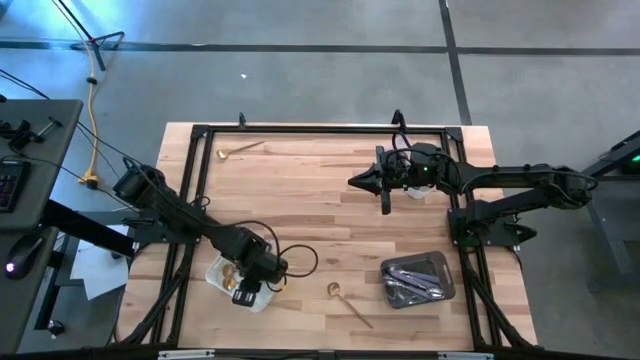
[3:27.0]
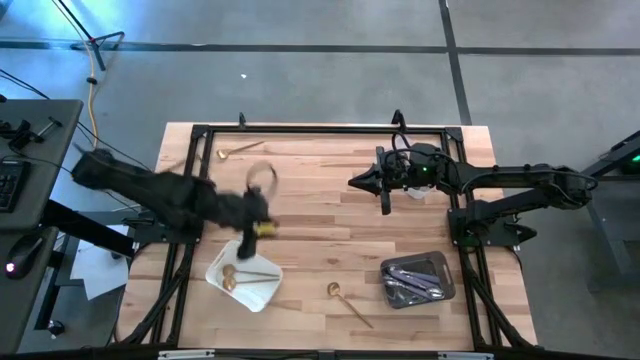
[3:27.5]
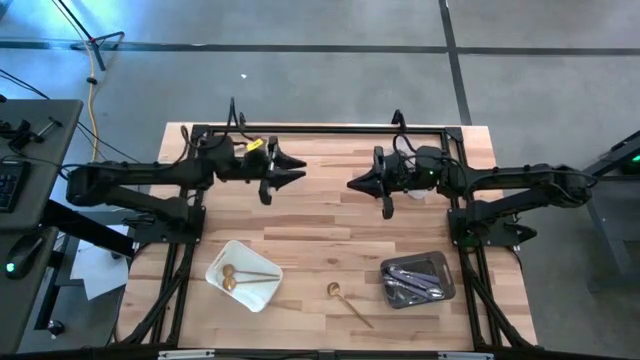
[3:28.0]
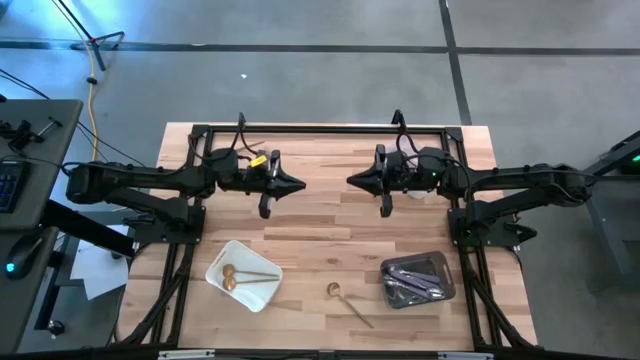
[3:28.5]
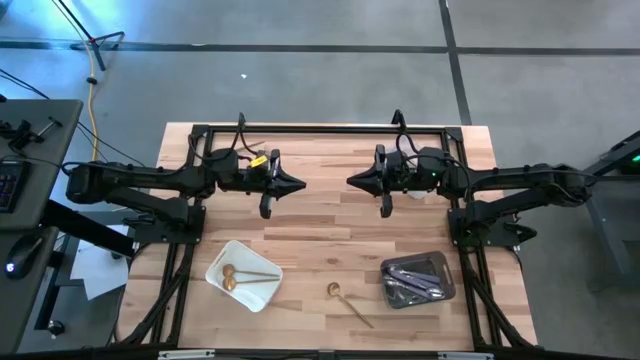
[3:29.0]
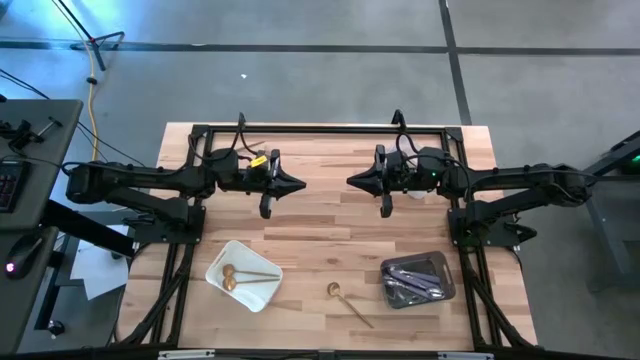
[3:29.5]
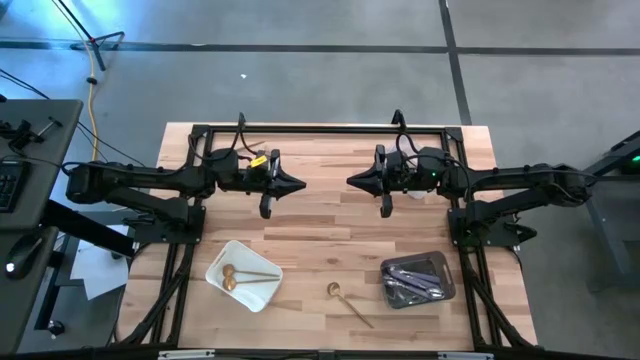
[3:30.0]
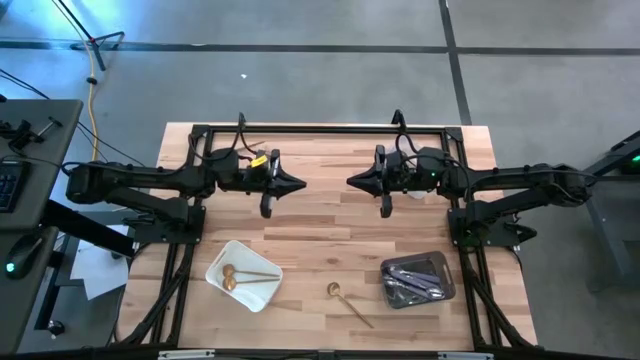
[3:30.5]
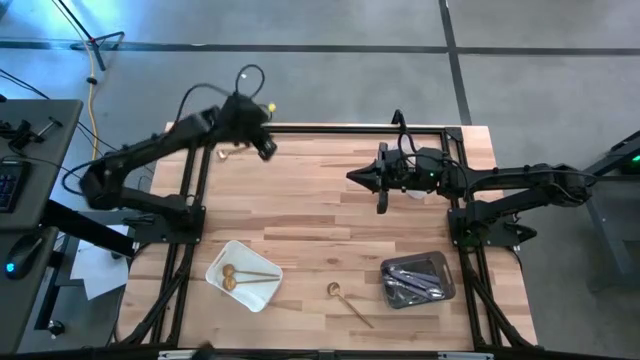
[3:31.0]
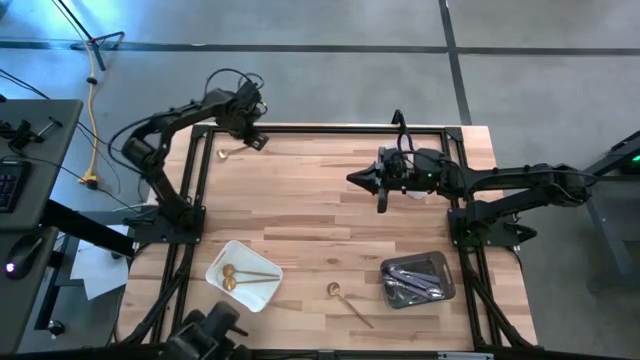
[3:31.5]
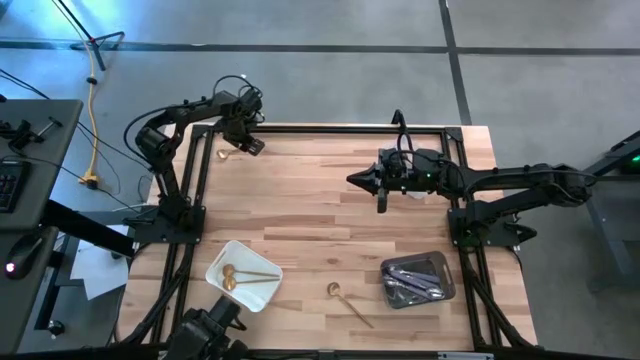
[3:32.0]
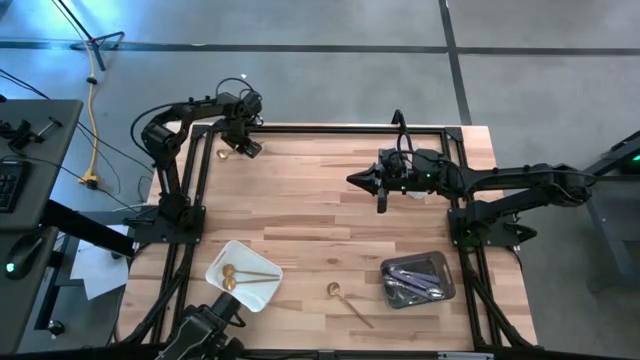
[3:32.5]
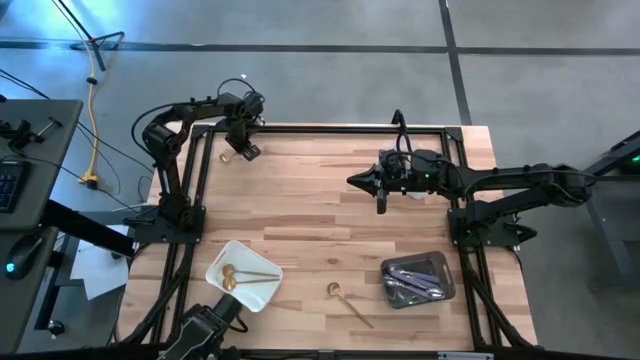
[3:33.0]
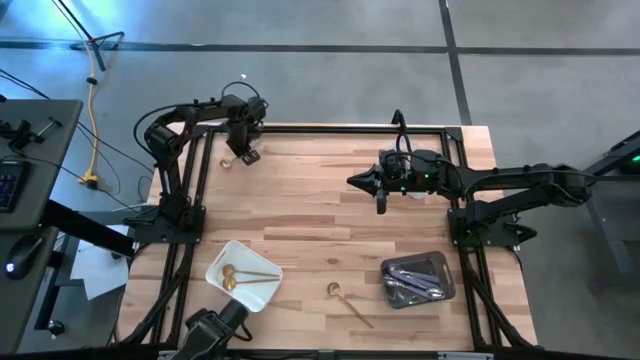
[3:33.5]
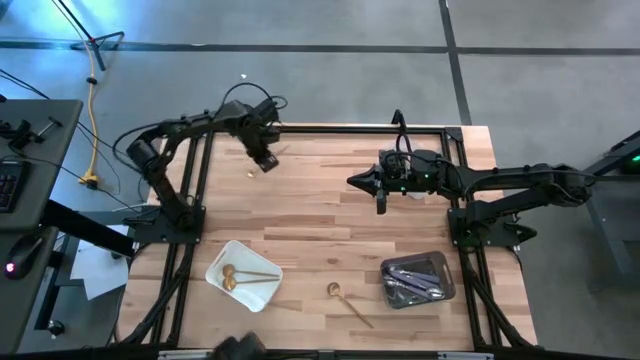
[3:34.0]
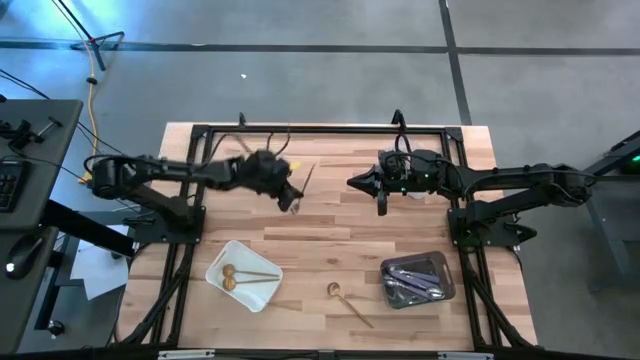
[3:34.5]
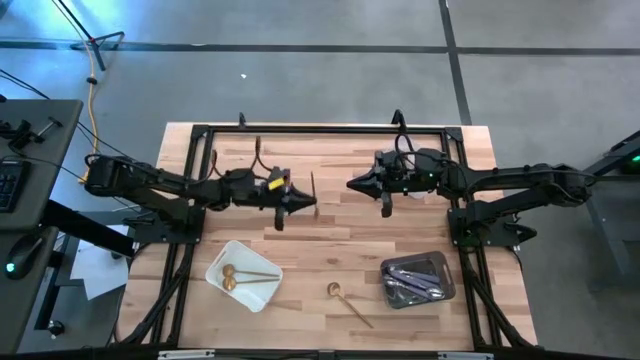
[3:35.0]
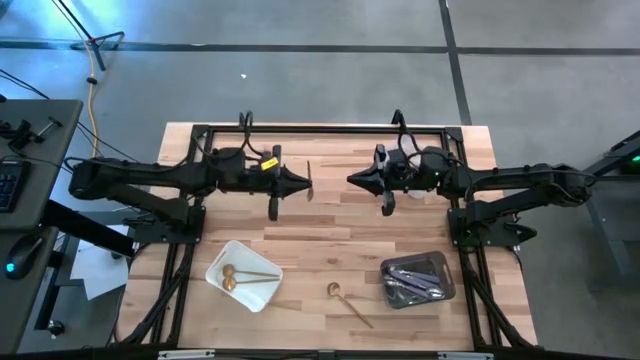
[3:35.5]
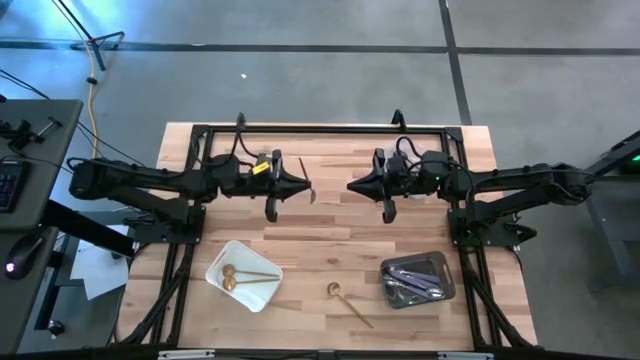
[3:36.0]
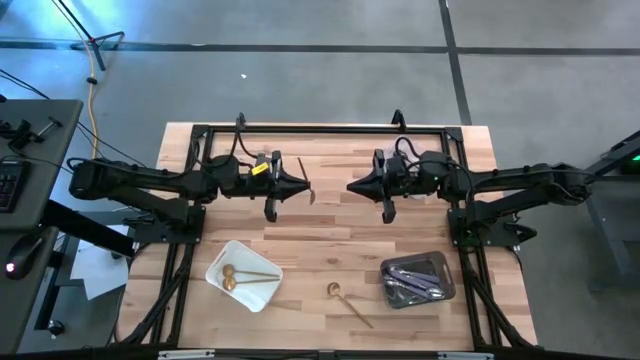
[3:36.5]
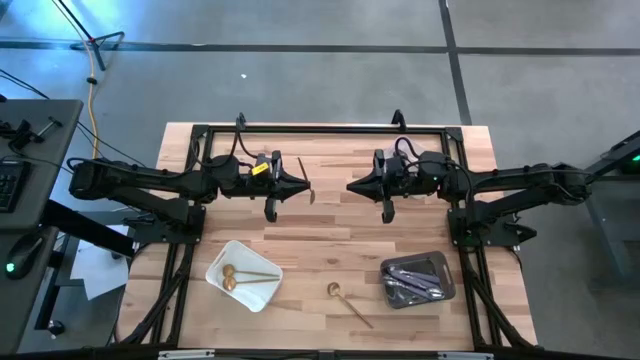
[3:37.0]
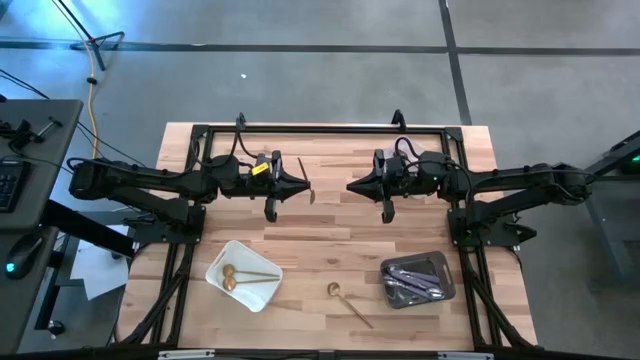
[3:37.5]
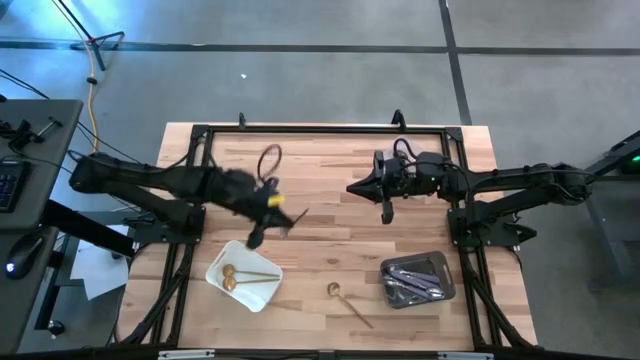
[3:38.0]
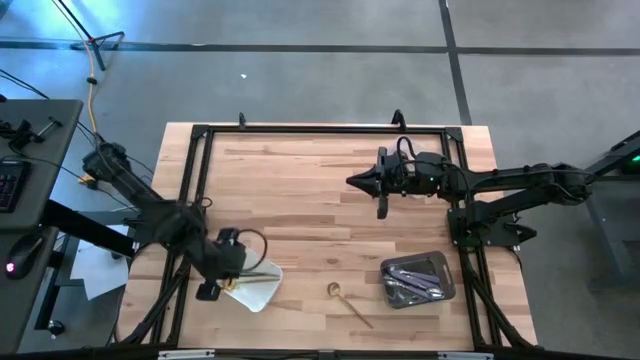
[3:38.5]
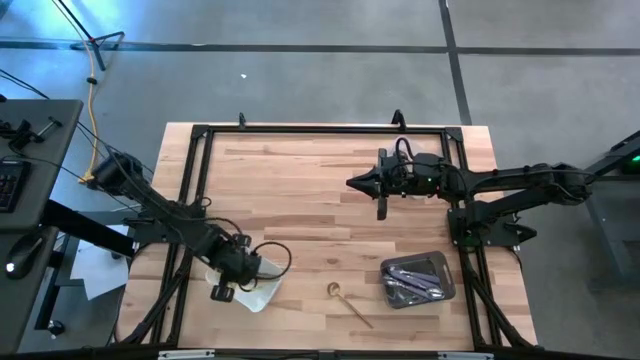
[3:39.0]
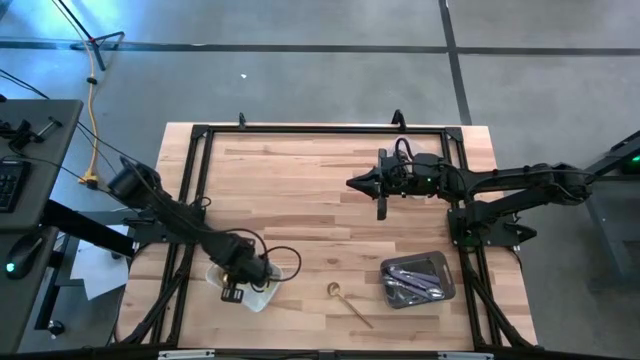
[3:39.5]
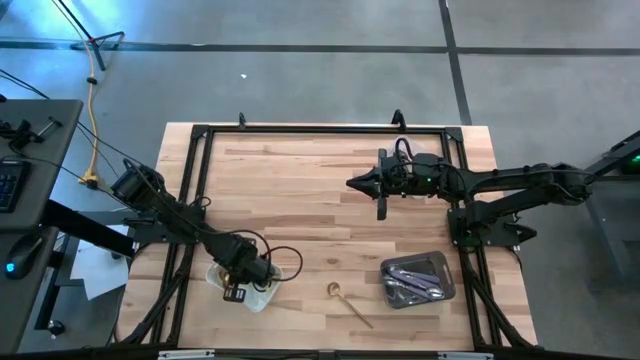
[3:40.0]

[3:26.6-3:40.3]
Task: Sort silverware by color (type)
Put the gold spoon into the white bin

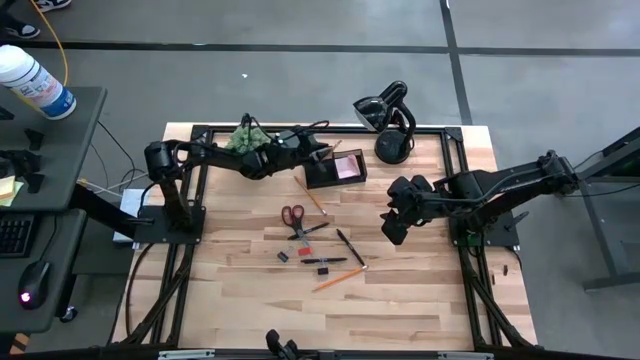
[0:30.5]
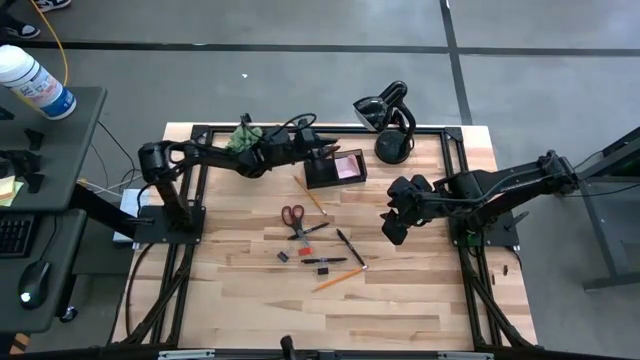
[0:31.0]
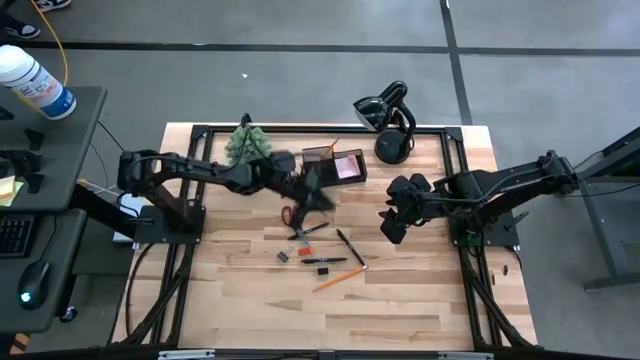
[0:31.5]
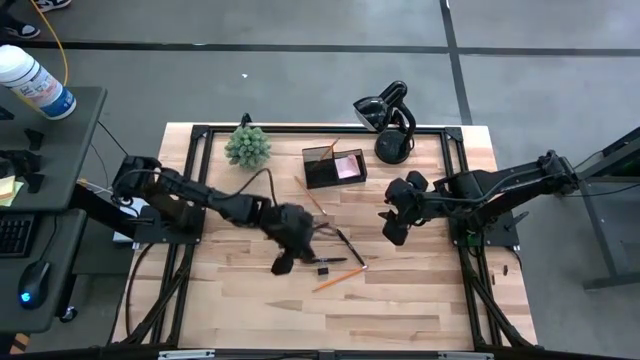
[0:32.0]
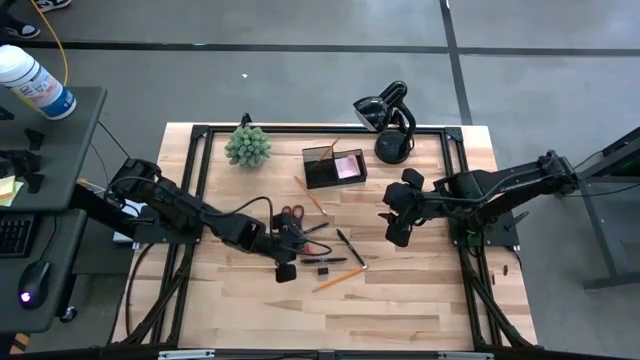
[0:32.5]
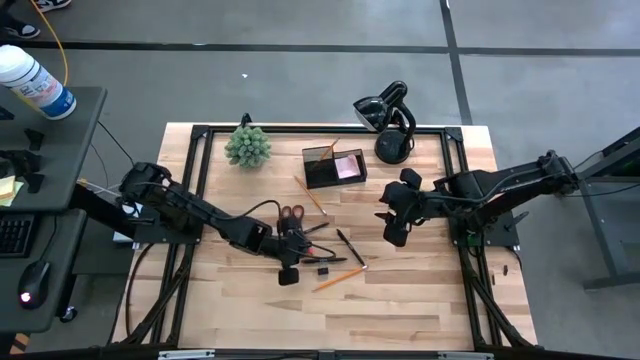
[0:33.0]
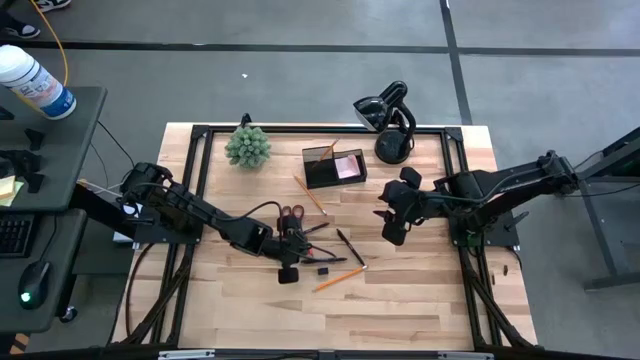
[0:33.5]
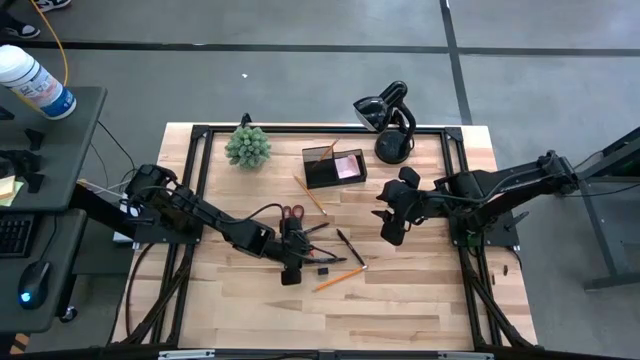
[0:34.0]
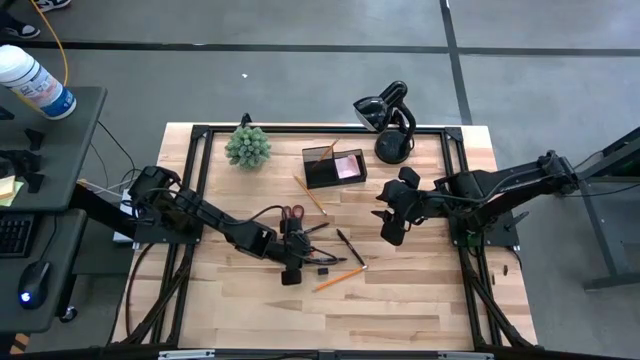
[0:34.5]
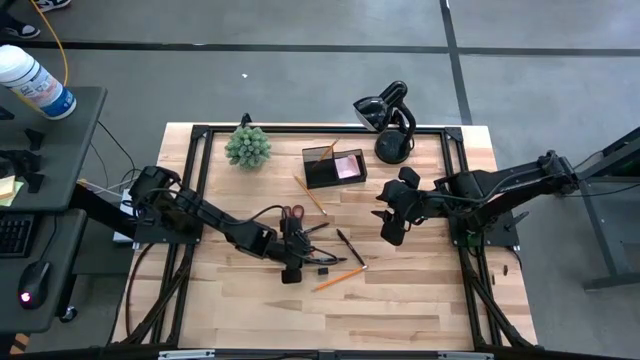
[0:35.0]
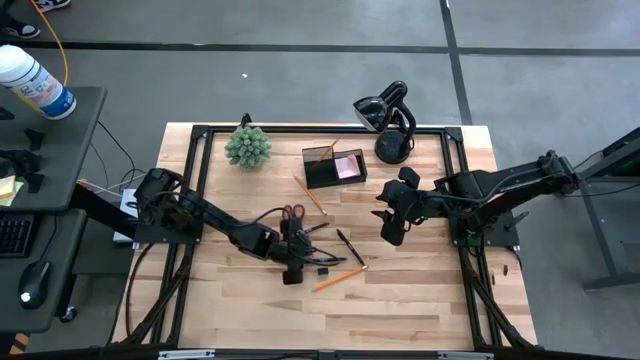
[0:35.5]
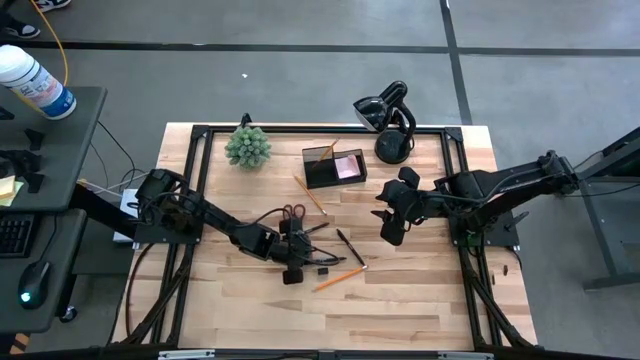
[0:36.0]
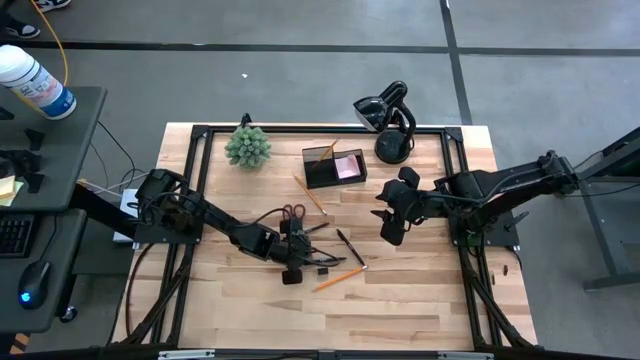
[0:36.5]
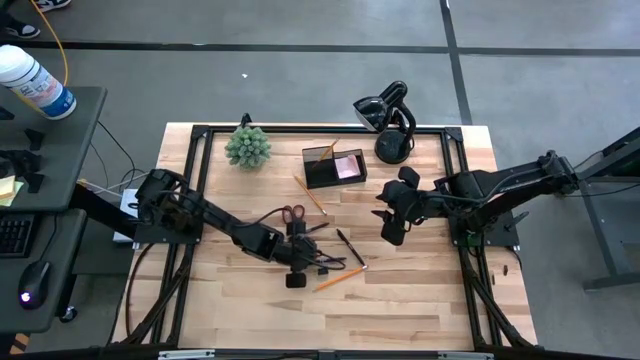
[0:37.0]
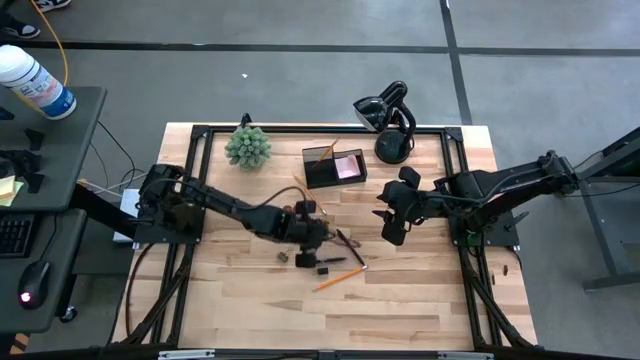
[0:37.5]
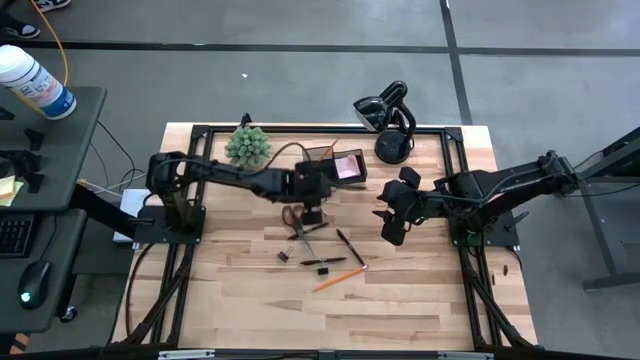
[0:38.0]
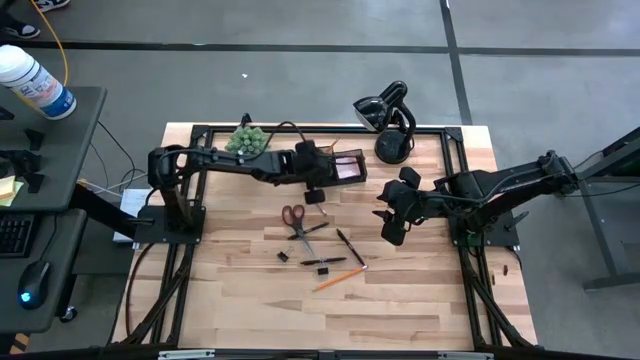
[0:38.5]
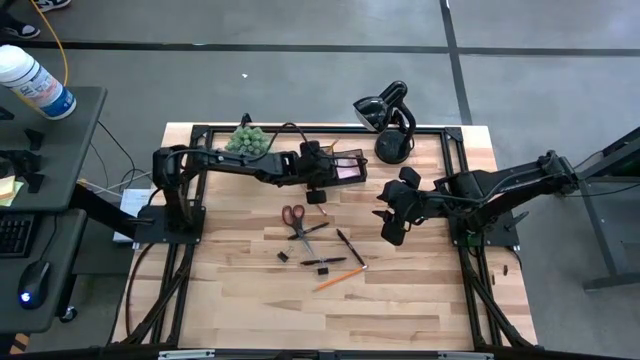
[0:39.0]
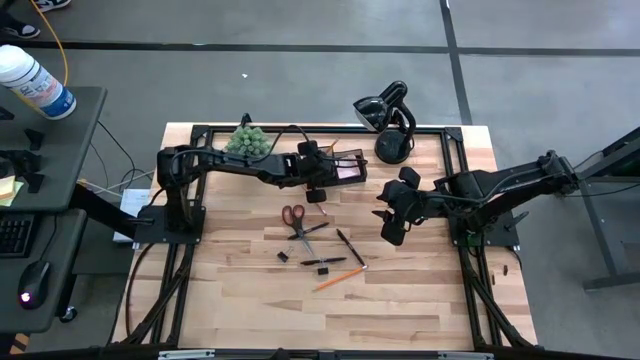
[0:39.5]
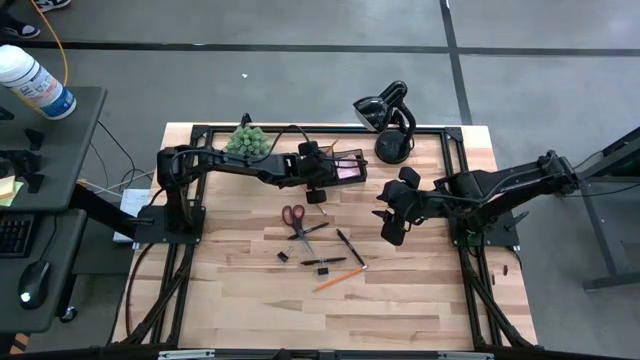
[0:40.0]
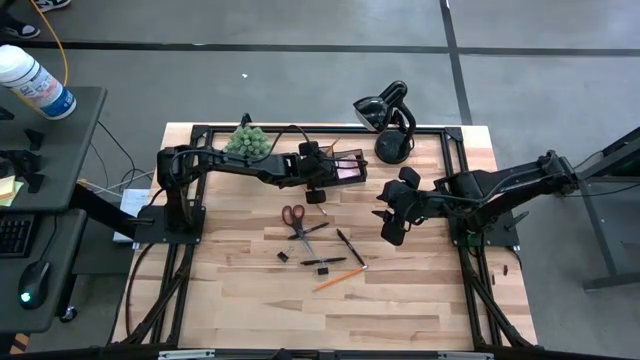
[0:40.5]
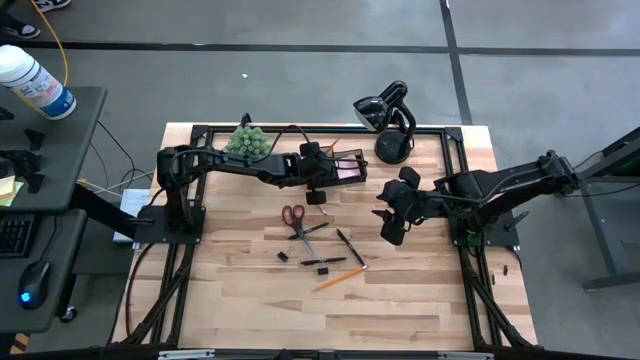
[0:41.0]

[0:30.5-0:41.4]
Task: Pick and place office supplies into organizer
Put the orange eraser into the black desk organizer
